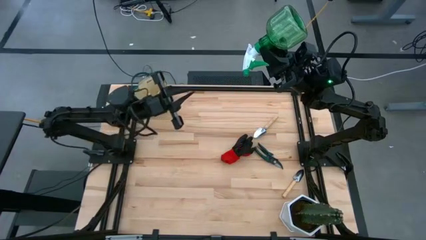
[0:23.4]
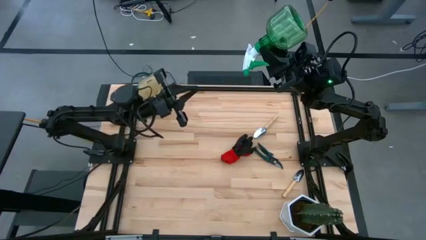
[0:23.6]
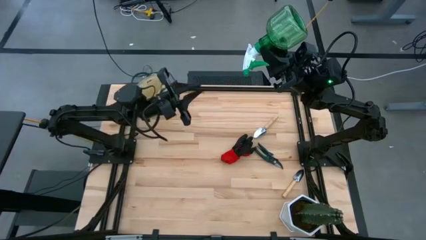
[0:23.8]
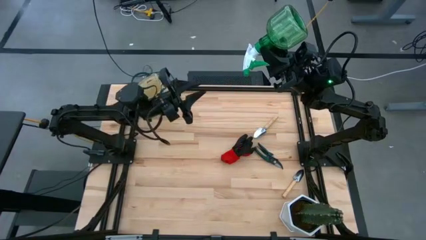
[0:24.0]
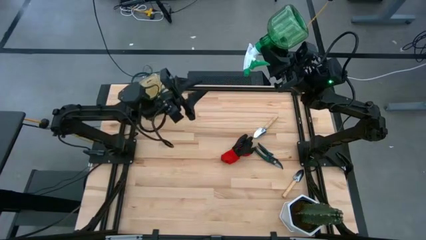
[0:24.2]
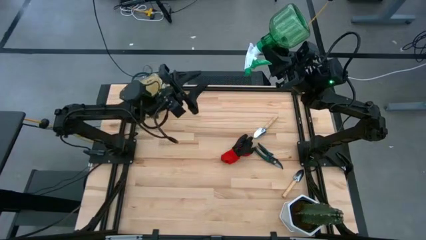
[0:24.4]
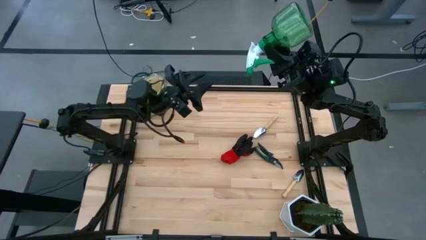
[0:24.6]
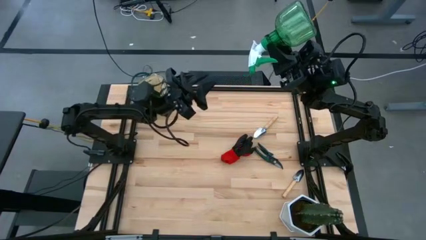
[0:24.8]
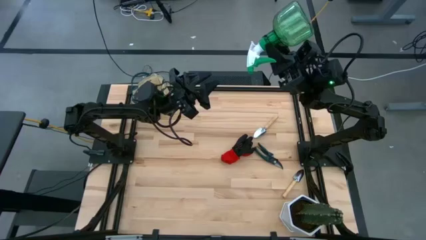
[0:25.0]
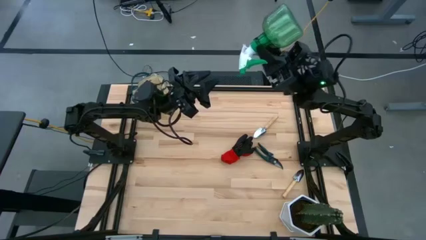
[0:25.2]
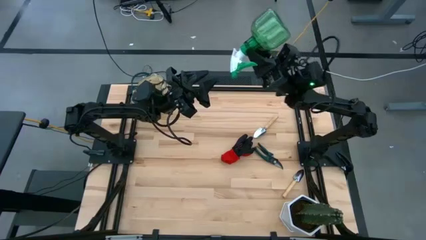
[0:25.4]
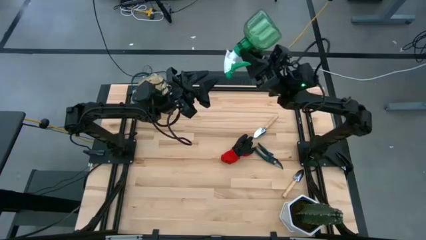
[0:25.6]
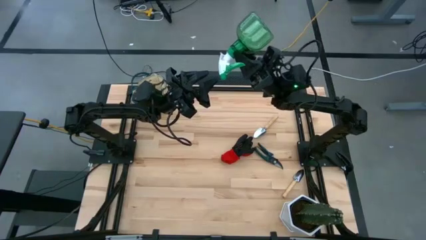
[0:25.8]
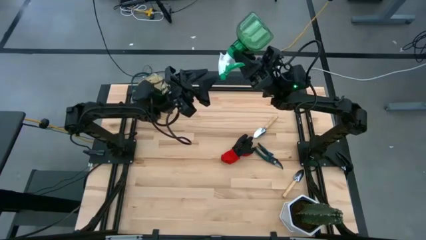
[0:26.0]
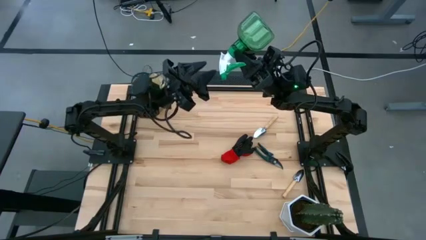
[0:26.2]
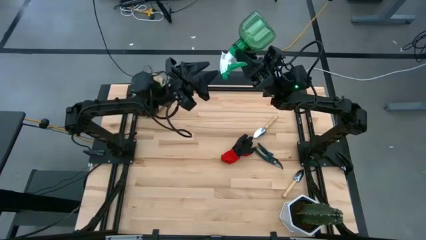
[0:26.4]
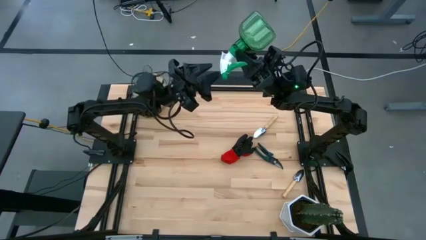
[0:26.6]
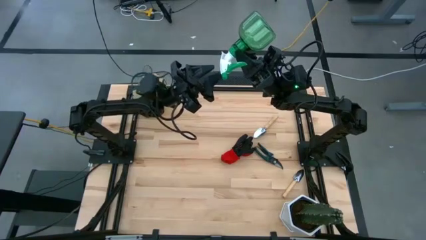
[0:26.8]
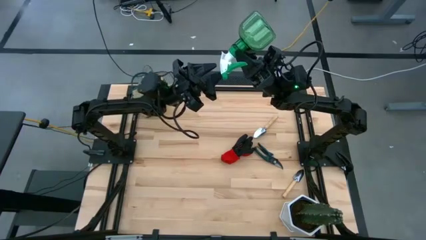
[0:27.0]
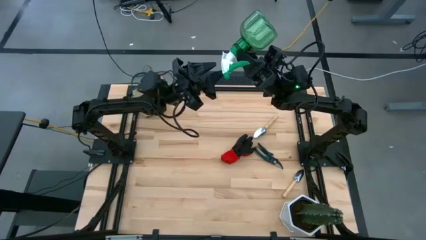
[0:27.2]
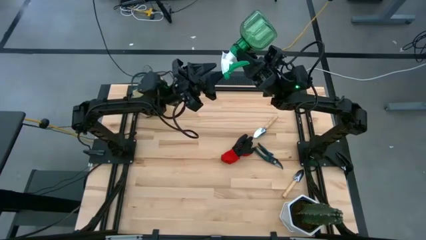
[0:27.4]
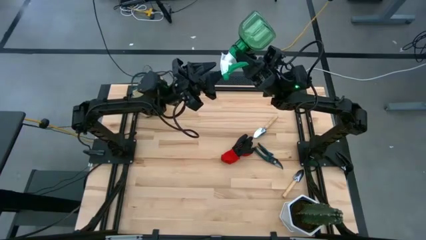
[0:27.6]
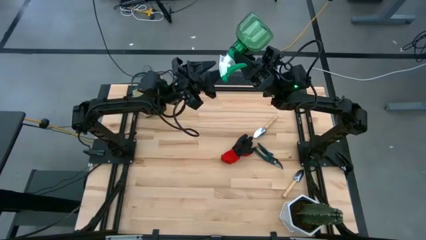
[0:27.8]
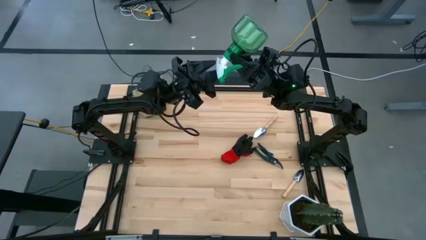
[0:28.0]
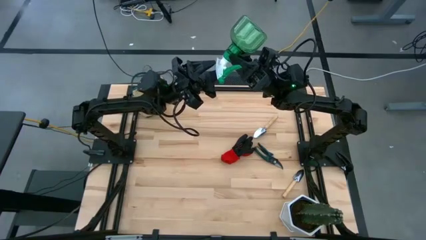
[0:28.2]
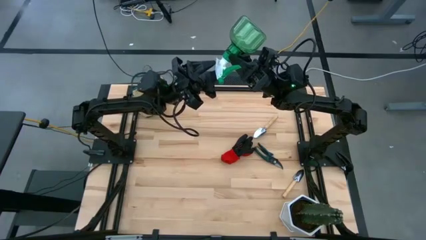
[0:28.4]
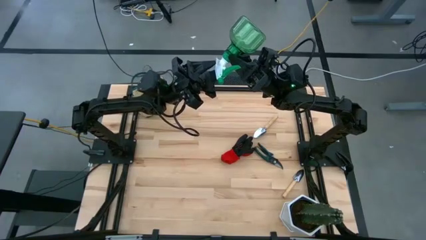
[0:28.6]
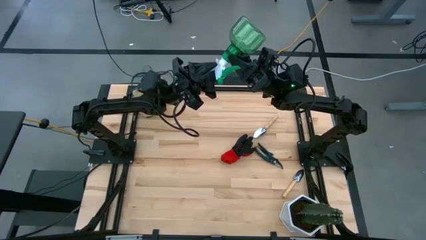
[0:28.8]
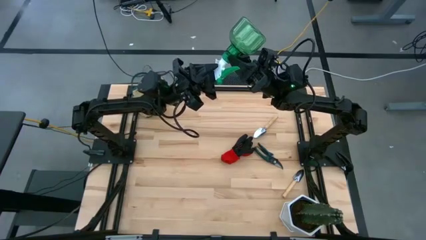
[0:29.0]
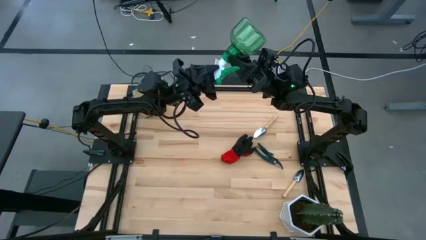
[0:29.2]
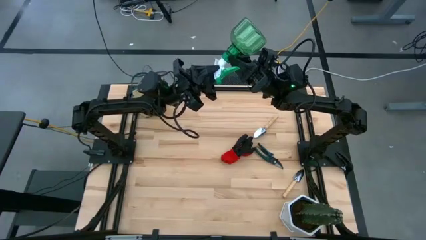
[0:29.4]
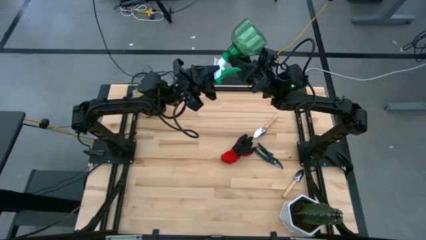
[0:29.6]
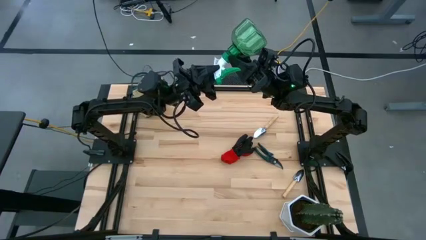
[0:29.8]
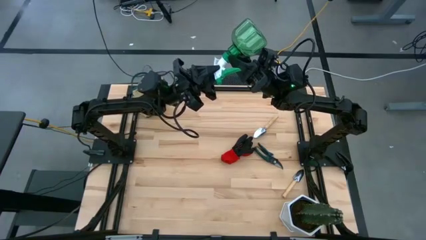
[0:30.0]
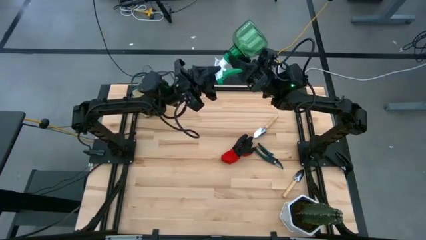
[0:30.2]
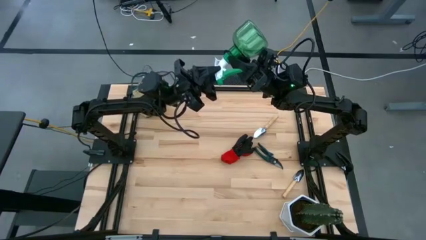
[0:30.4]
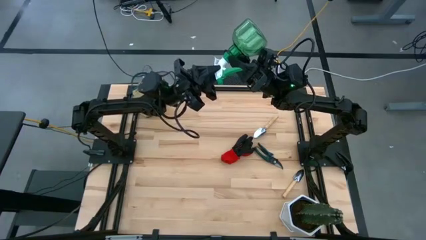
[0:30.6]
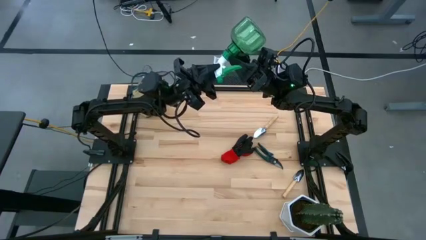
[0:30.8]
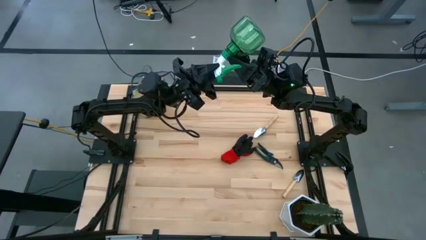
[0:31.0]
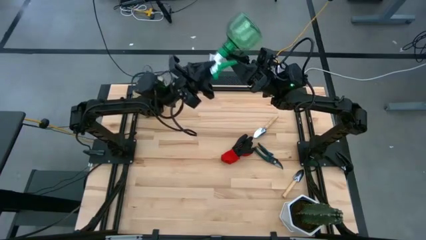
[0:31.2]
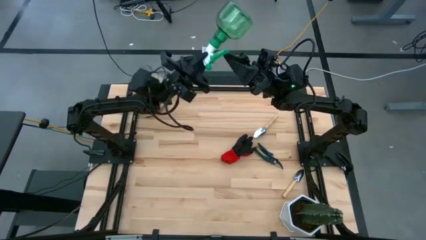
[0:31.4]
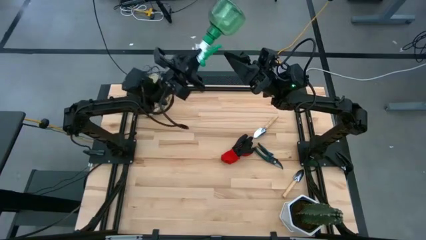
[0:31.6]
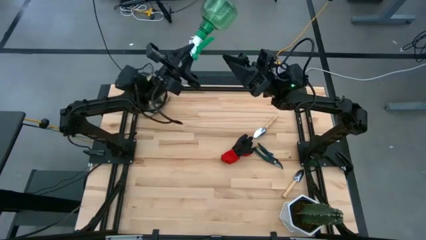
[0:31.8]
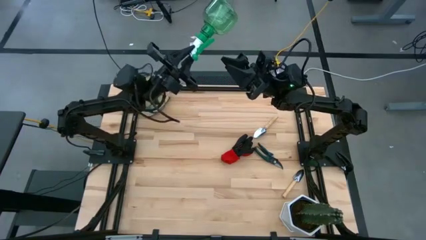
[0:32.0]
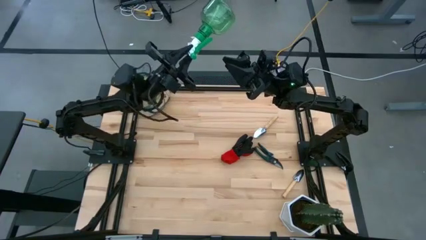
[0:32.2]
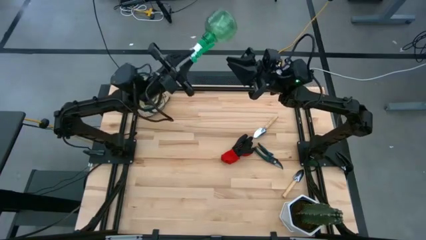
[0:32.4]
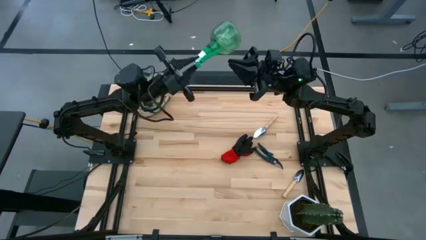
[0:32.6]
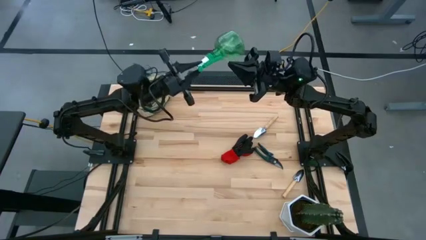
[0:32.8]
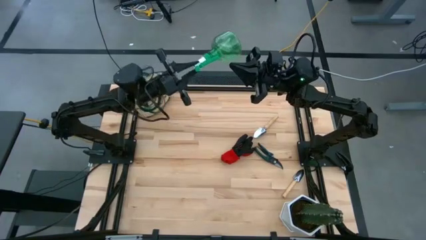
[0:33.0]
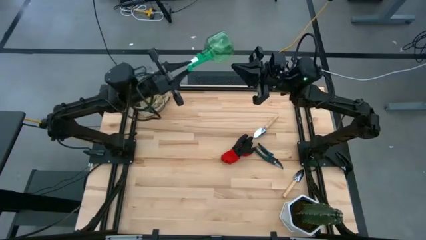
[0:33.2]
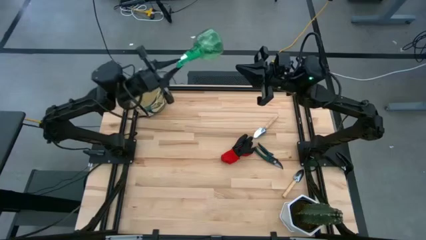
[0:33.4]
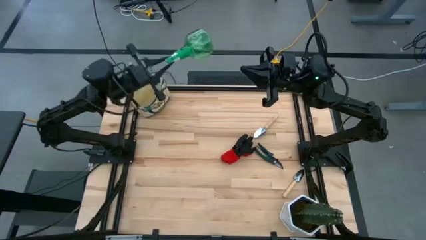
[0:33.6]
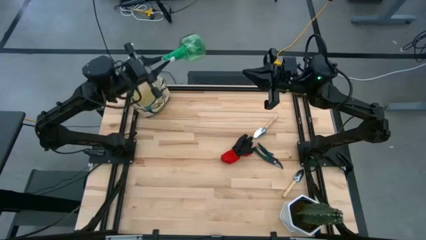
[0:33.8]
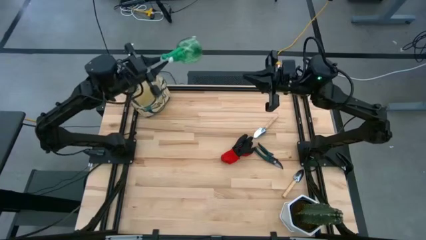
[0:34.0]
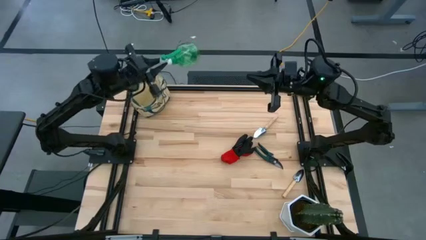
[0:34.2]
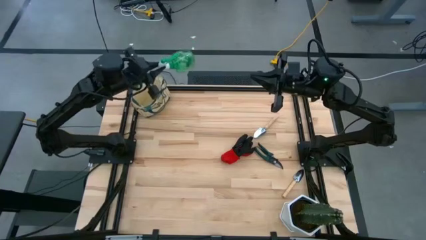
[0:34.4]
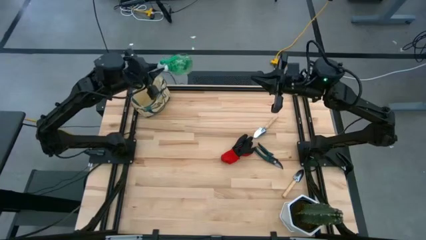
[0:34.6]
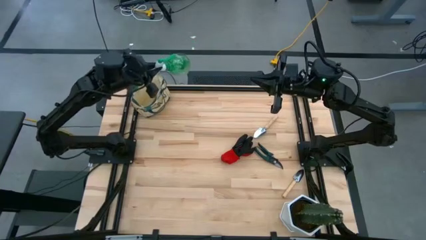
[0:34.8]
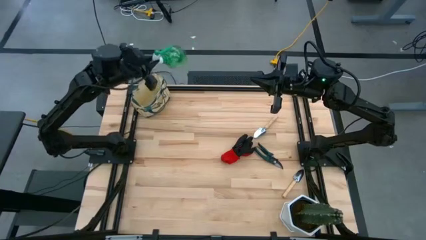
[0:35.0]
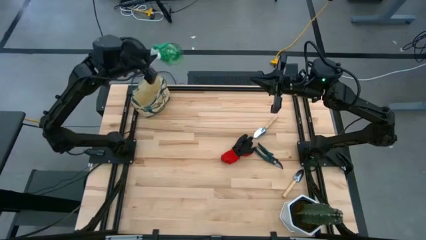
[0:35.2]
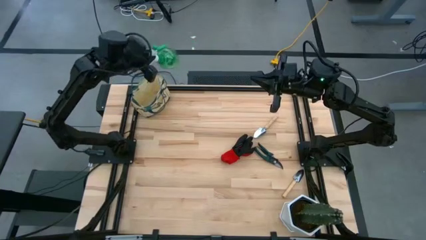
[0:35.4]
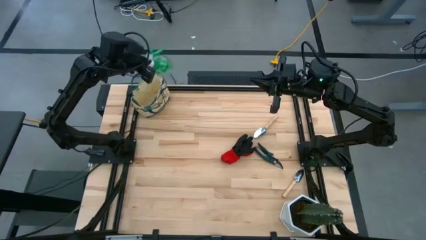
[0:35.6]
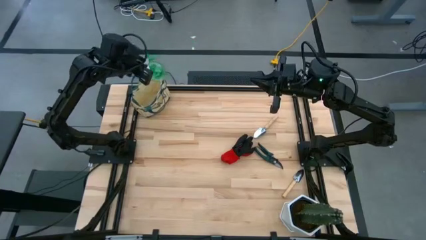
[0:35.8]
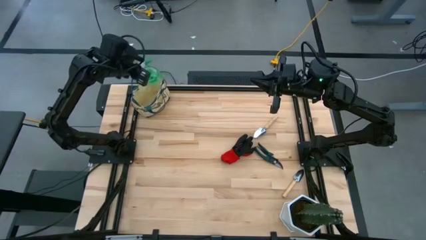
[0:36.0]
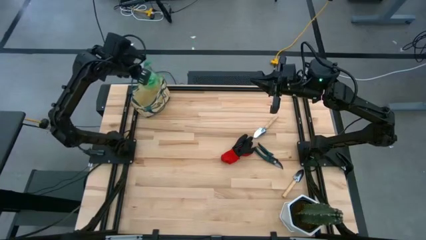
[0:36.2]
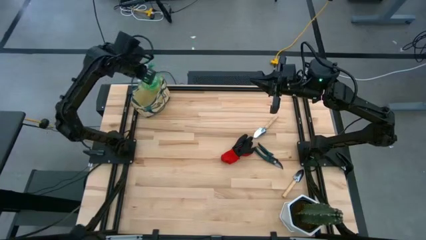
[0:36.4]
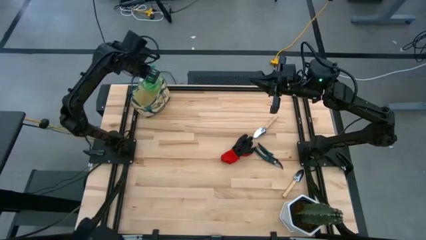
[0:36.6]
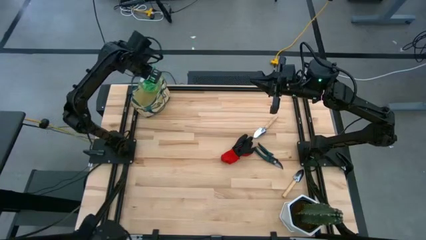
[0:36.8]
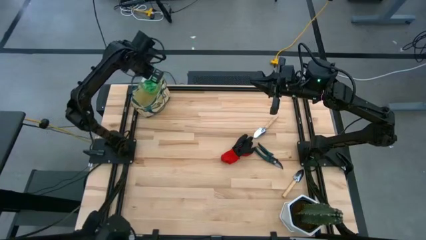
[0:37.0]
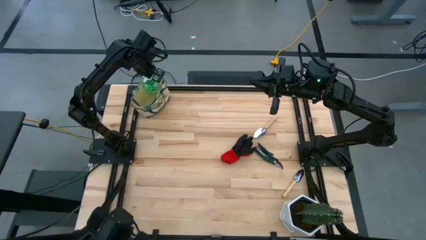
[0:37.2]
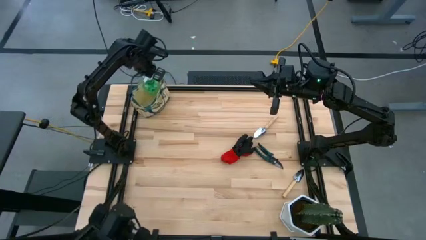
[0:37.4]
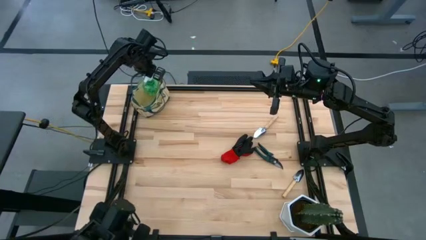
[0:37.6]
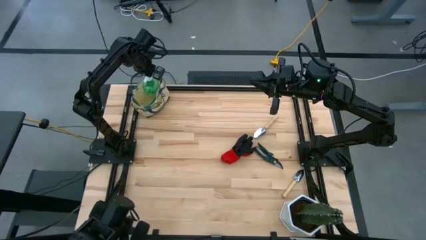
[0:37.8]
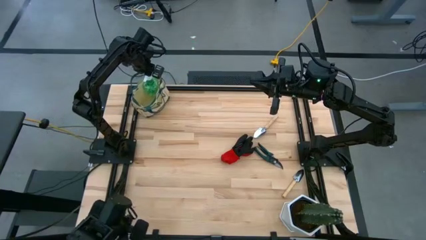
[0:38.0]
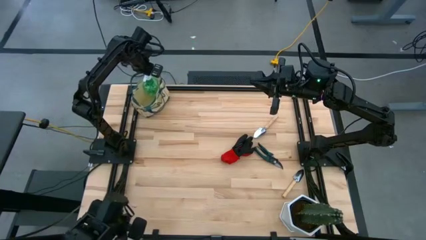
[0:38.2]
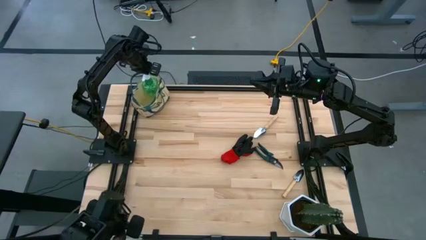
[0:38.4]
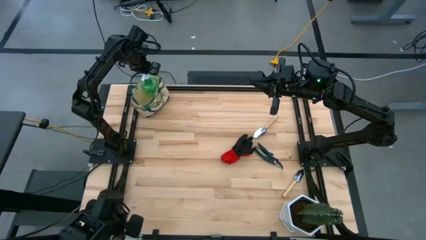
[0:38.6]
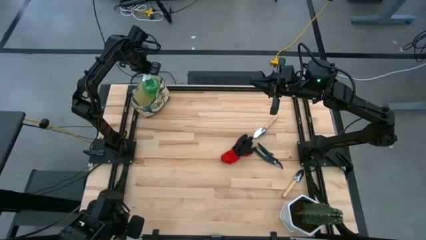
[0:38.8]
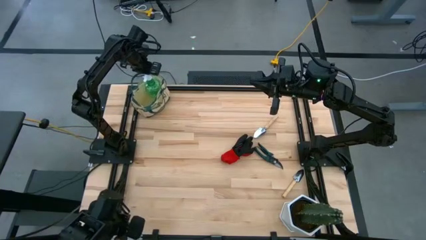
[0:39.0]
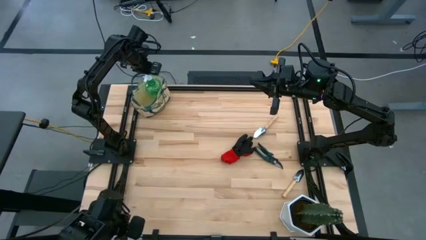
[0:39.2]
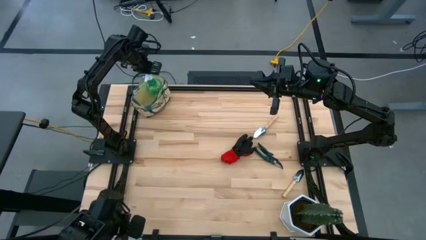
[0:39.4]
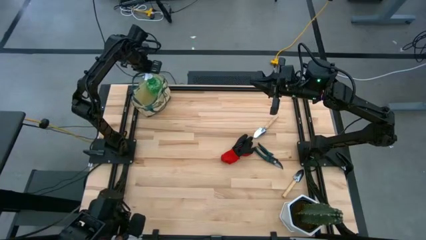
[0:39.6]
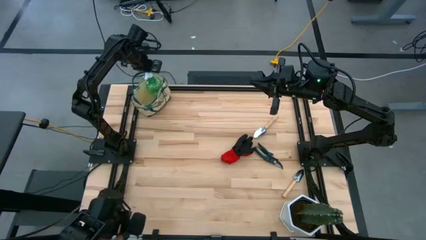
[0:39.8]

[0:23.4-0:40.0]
Task: Pick & Place Garden tools in Gardening bag
Put the green spray bottle into the gardening bag
